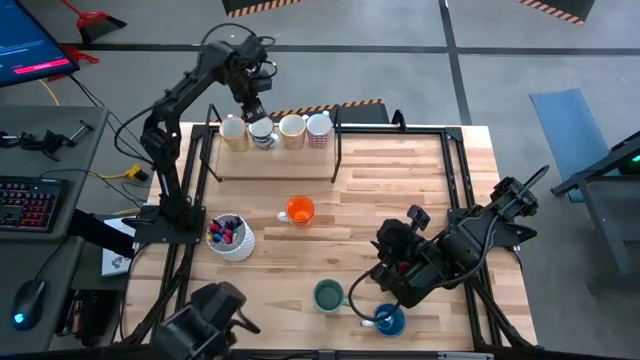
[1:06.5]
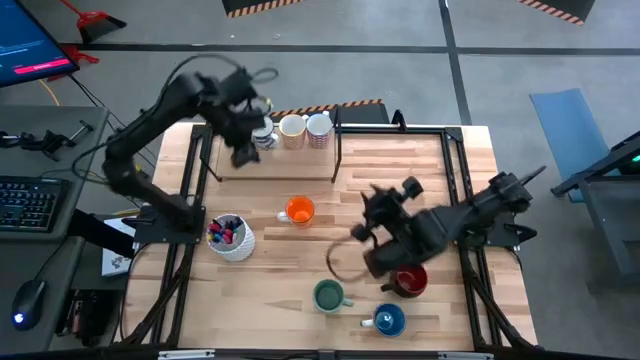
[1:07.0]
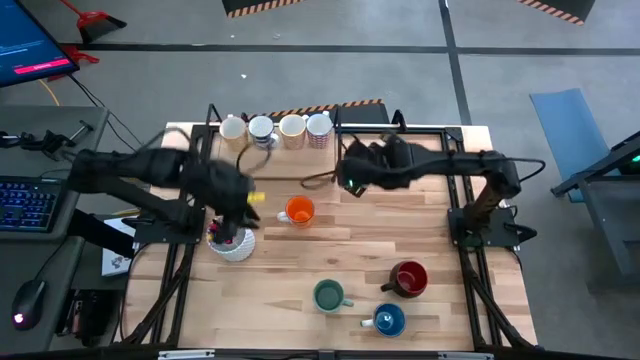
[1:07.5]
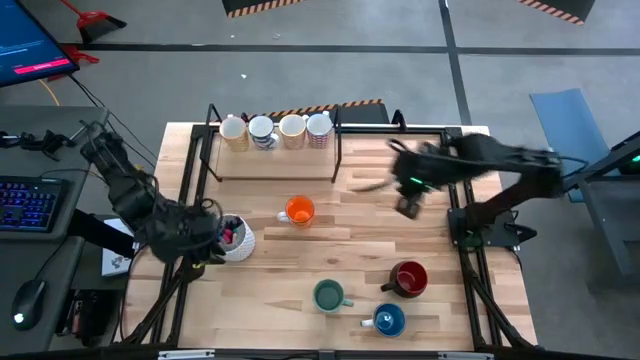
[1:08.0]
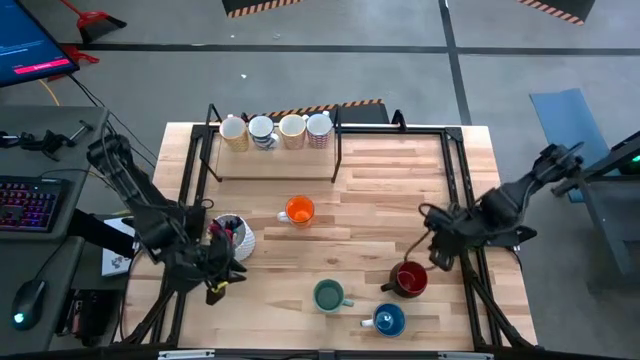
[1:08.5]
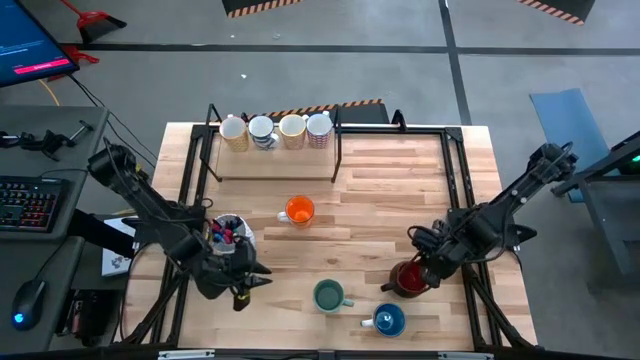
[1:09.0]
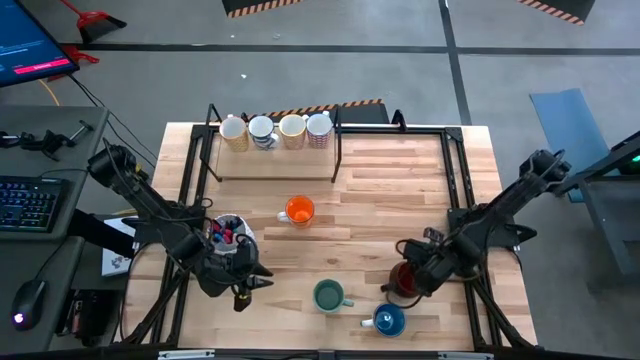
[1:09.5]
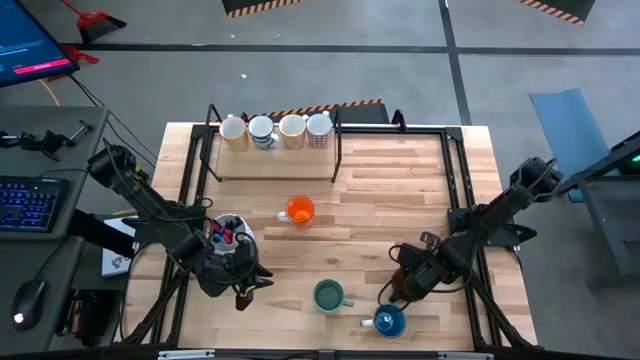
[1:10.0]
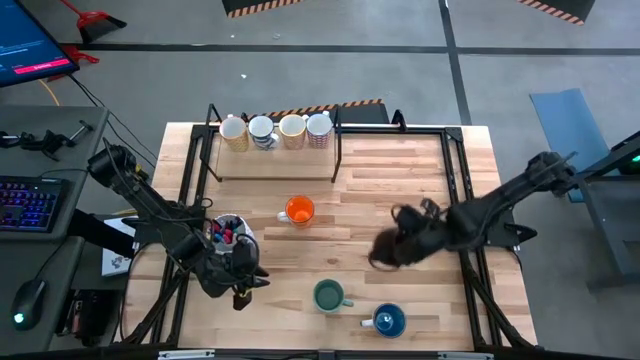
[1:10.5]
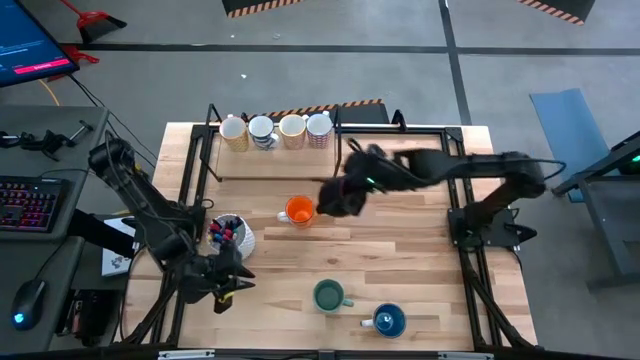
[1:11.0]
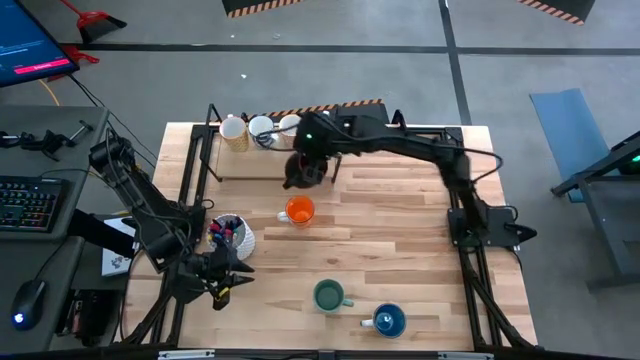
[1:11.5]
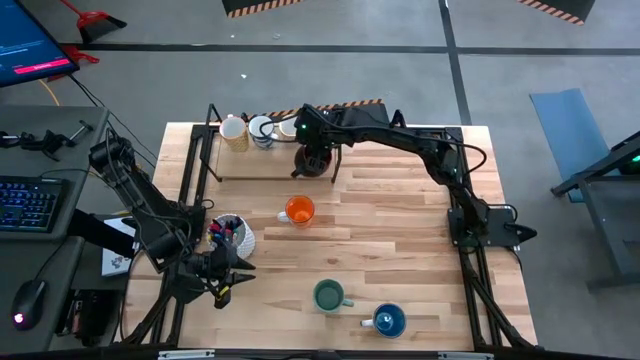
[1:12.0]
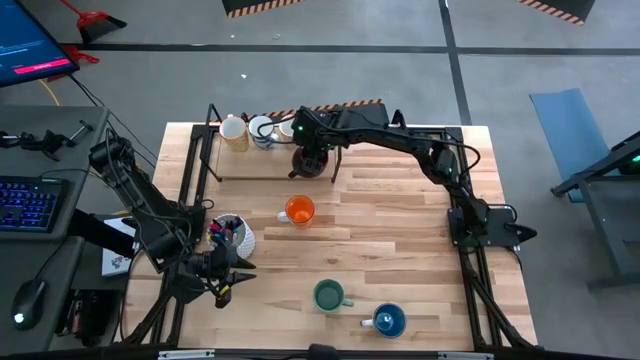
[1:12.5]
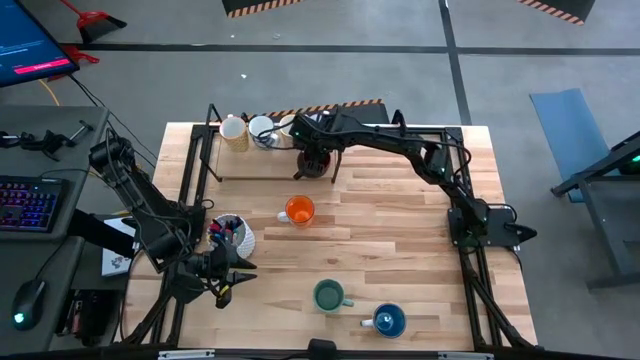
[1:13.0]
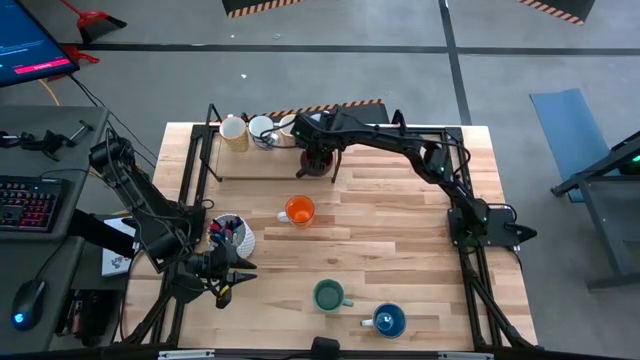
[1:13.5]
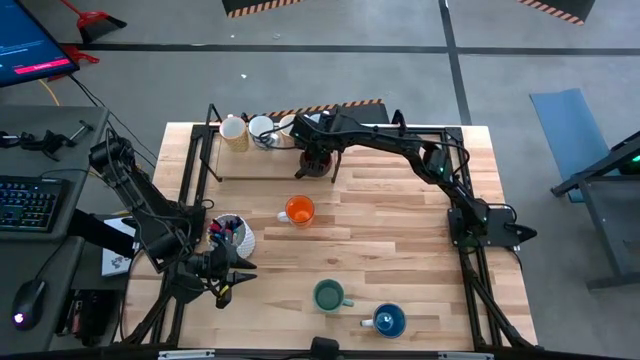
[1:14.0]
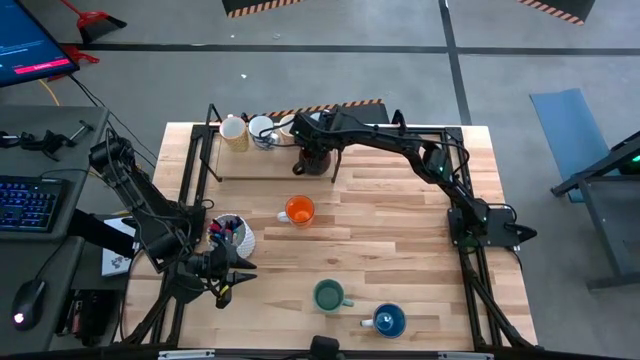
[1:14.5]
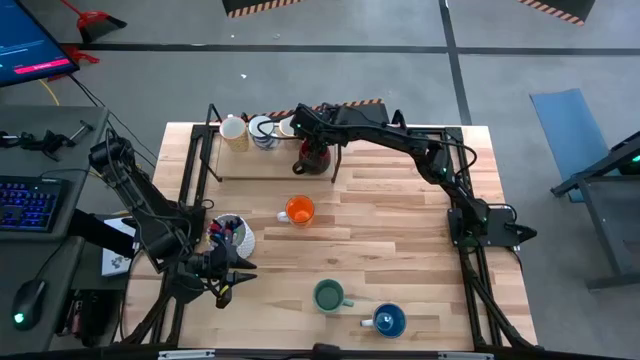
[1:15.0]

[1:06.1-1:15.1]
Task: Place coffee mugs
Put the black mug on the shelf

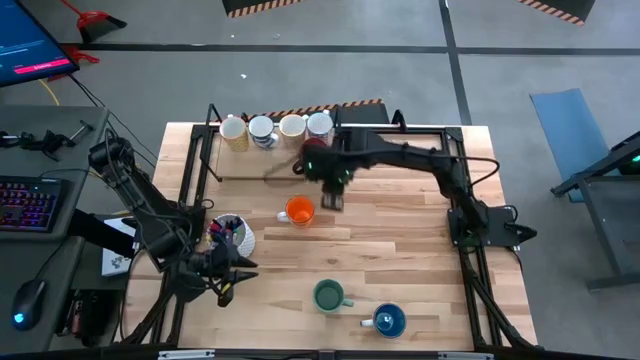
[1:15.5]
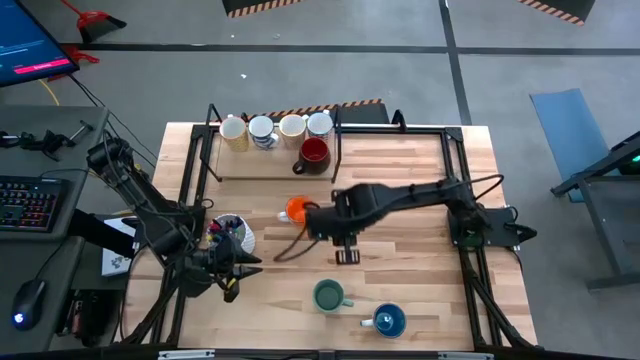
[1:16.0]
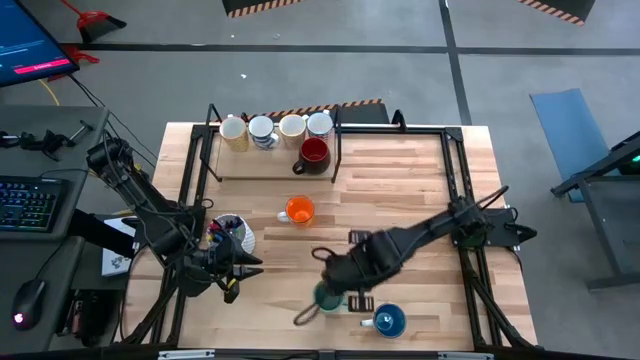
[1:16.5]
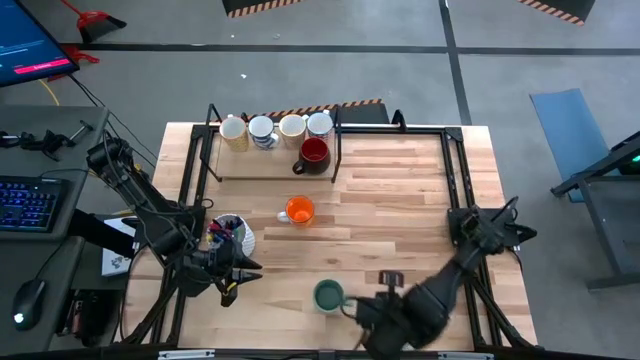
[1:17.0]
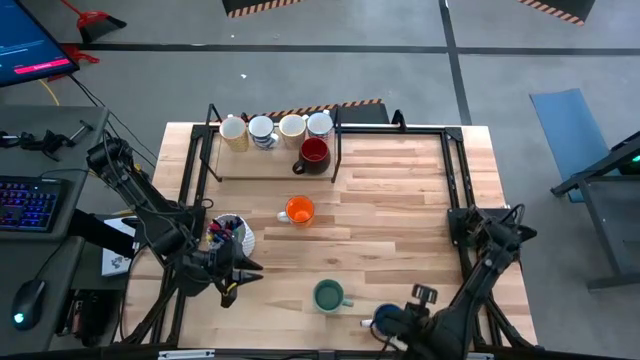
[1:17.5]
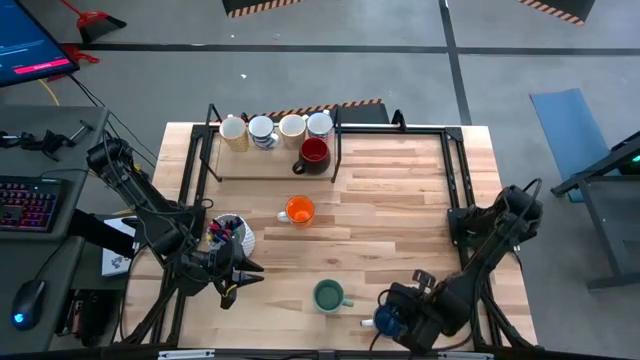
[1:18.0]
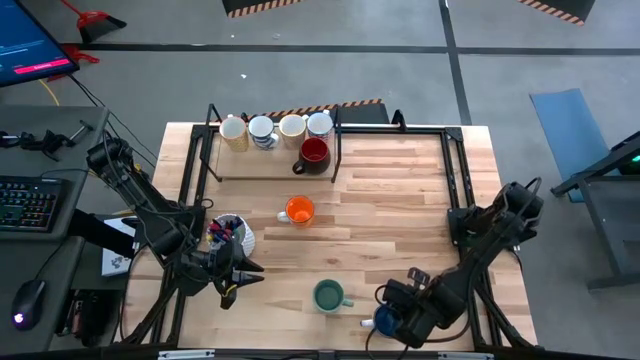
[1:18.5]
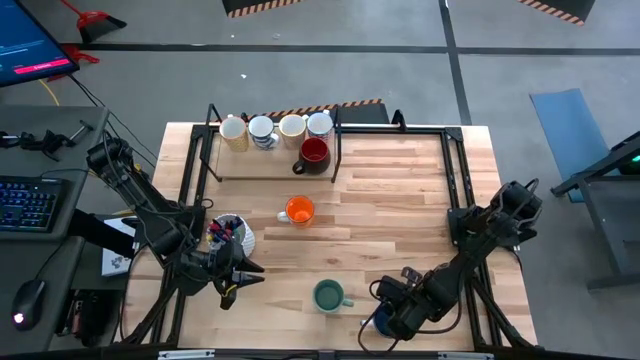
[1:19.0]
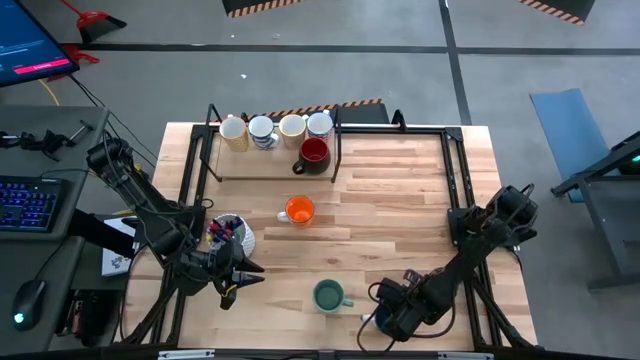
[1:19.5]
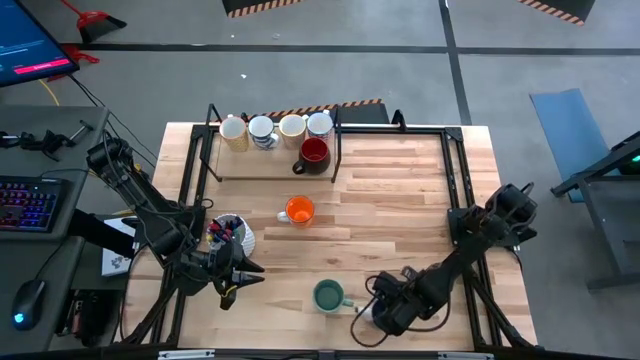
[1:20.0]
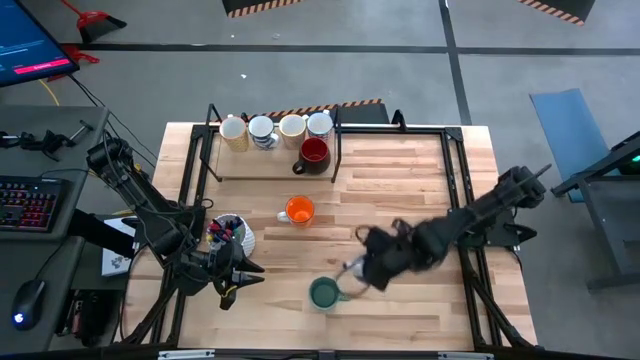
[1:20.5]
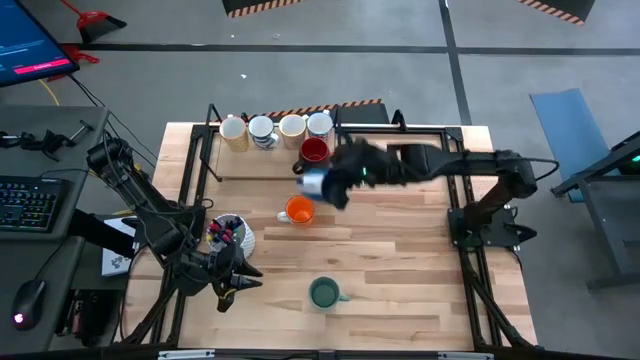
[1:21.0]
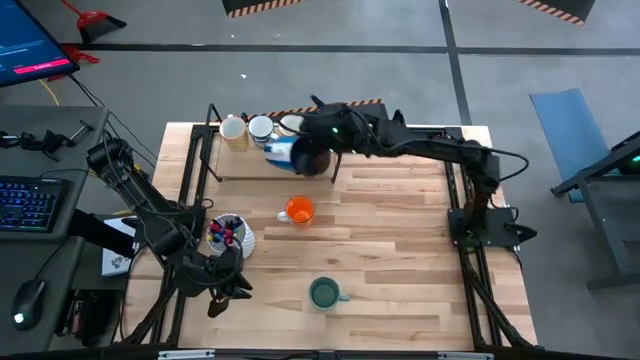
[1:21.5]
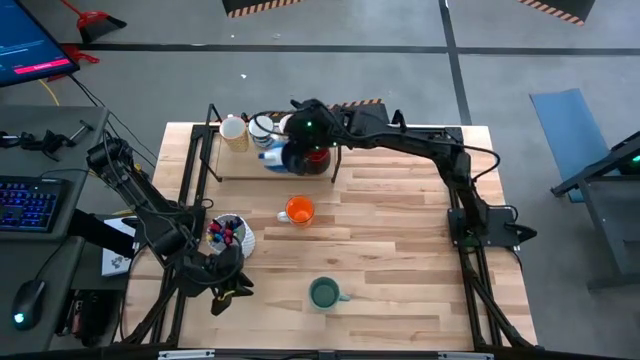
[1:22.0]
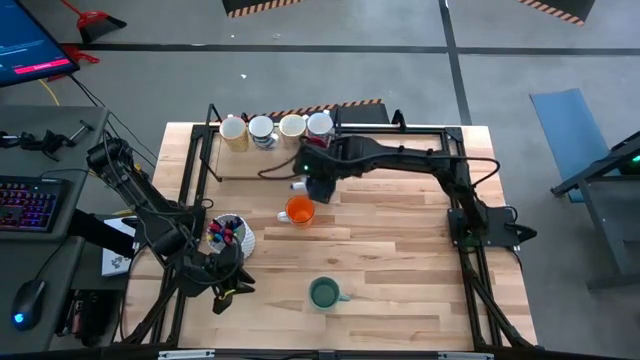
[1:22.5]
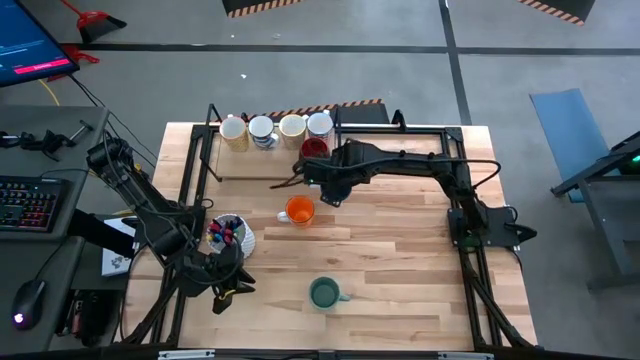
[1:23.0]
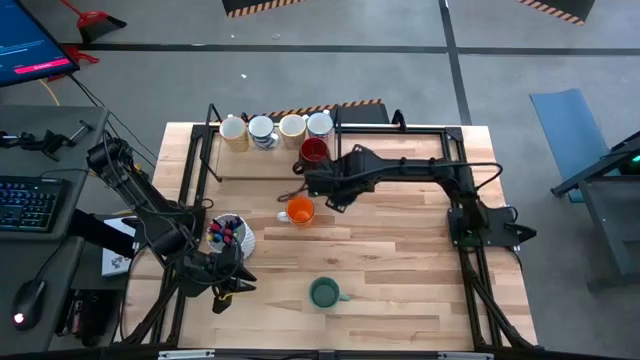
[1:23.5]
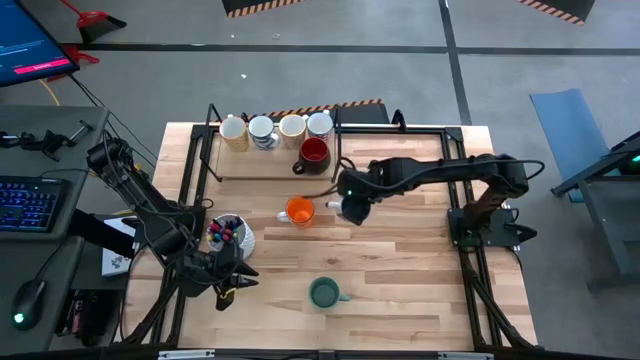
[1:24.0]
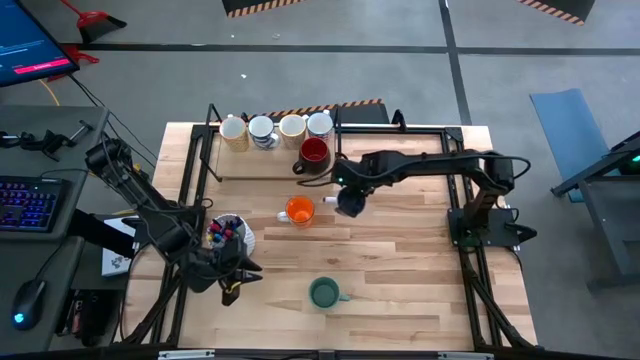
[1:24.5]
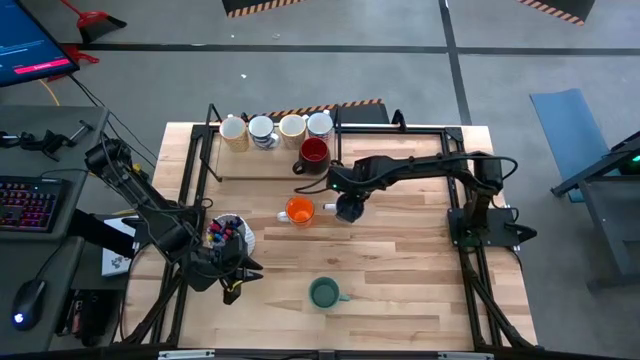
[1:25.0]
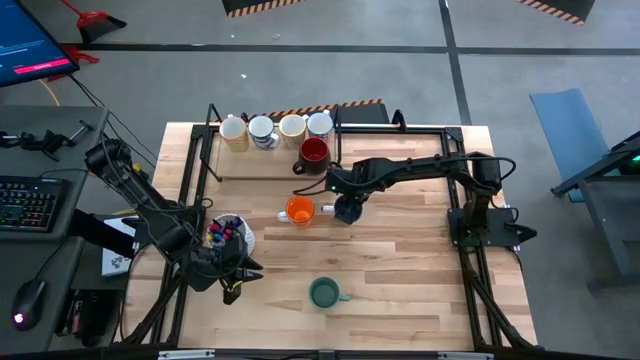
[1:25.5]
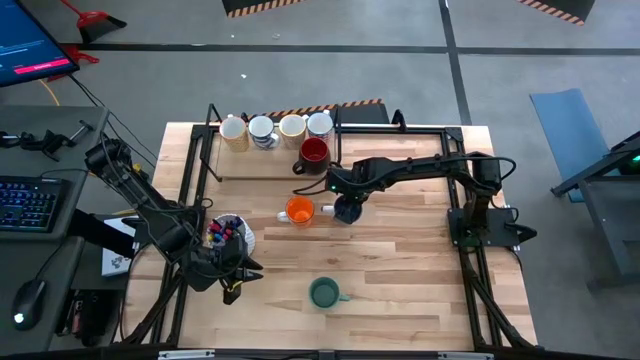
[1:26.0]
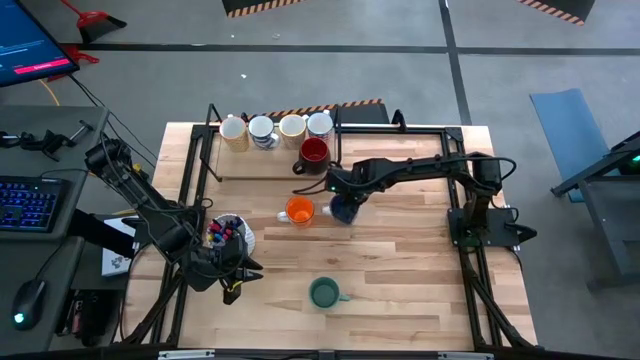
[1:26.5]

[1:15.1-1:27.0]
Move the blue mug to the center of the table

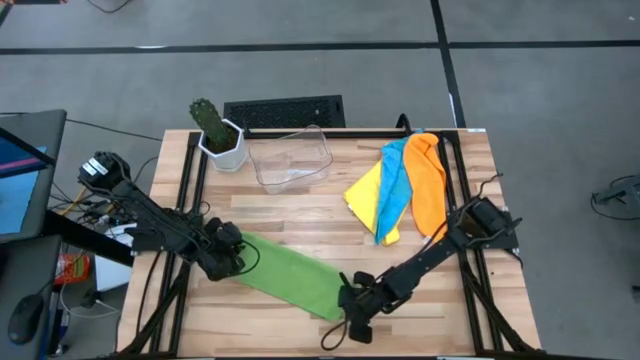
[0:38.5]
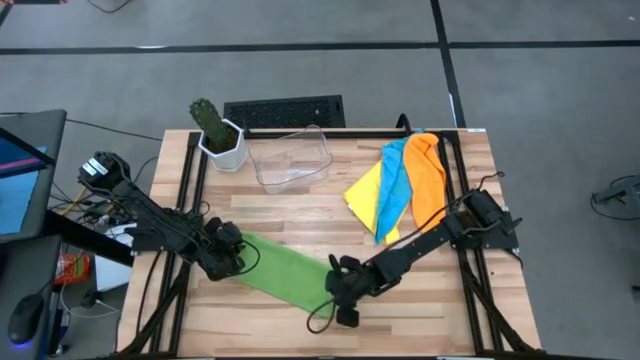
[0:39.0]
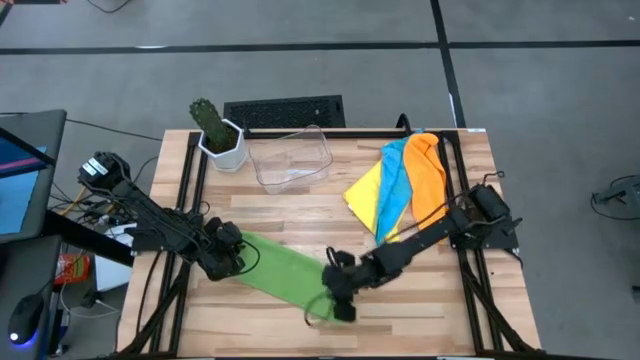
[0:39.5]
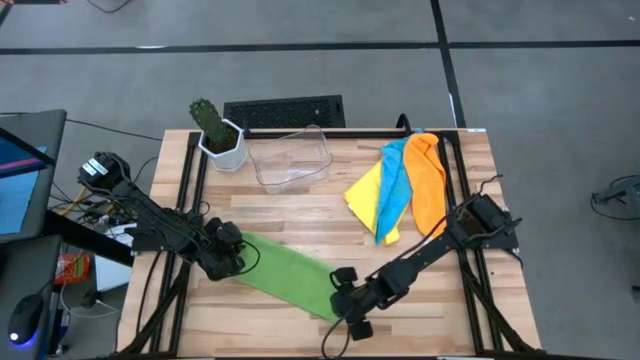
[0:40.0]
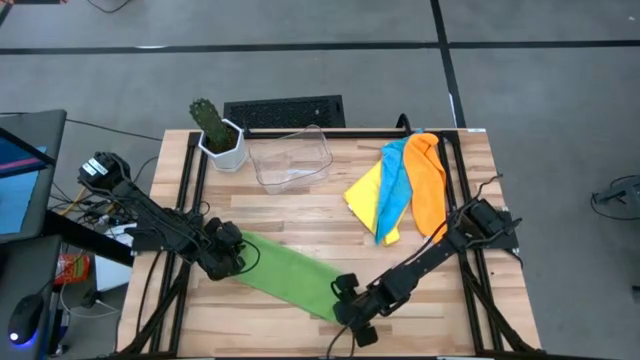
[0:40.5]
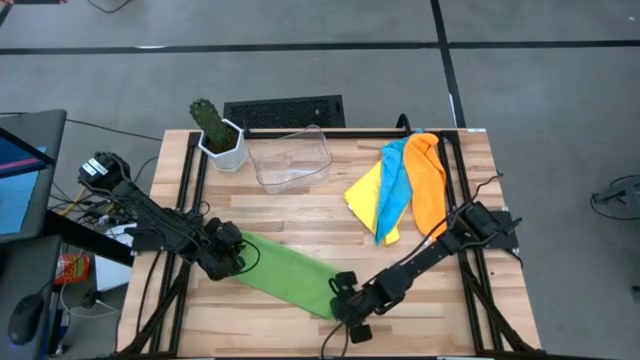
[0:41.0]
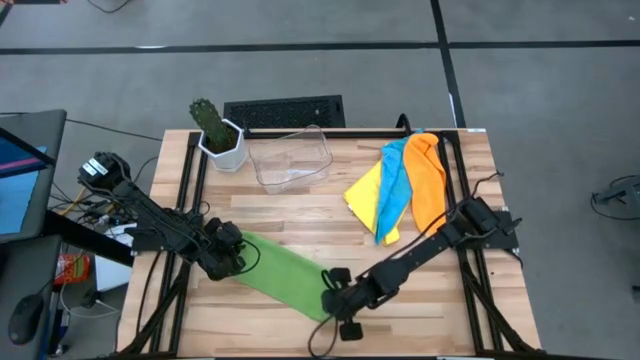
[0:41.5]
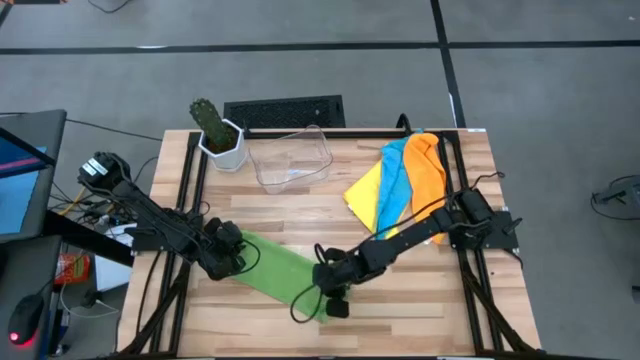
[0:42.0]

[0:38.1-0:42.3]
Task: Fold microfiber towels
Fold the green microfiber cloth
